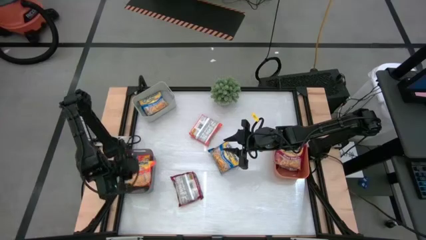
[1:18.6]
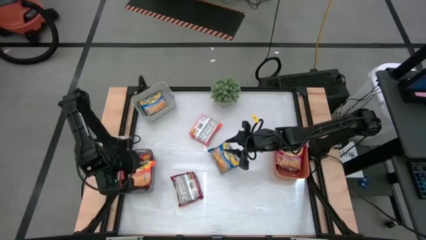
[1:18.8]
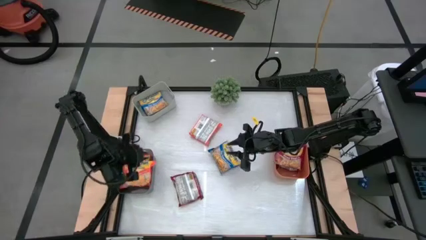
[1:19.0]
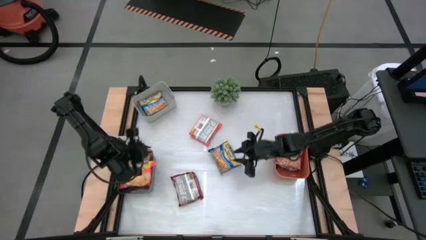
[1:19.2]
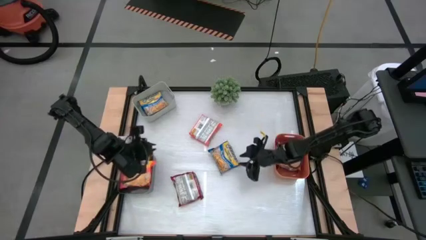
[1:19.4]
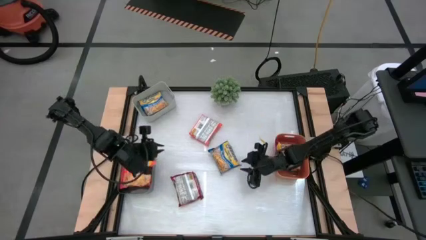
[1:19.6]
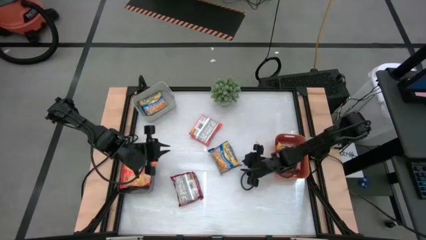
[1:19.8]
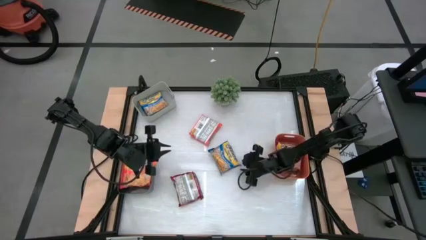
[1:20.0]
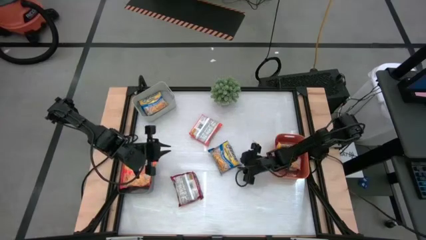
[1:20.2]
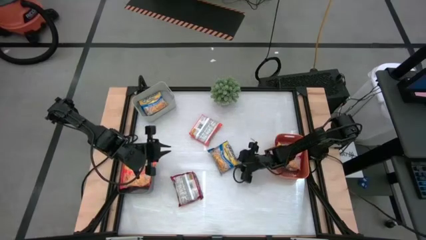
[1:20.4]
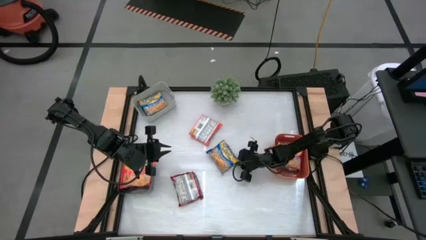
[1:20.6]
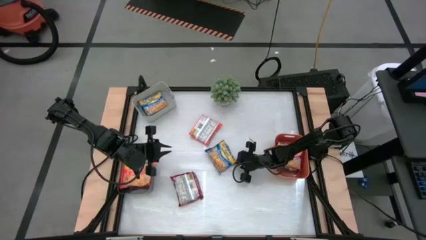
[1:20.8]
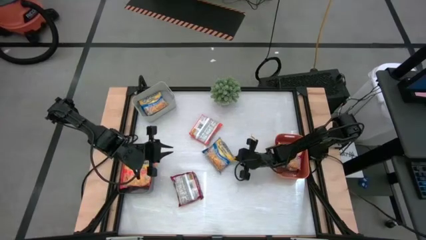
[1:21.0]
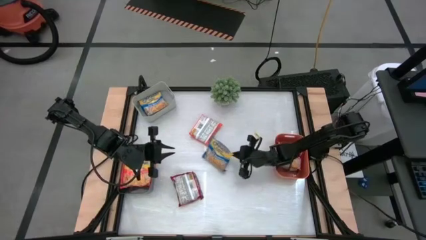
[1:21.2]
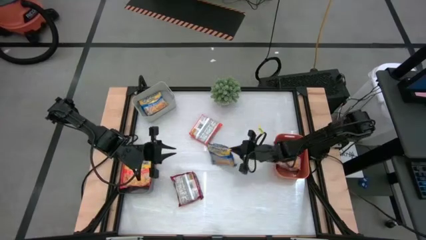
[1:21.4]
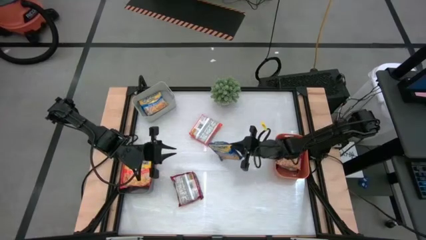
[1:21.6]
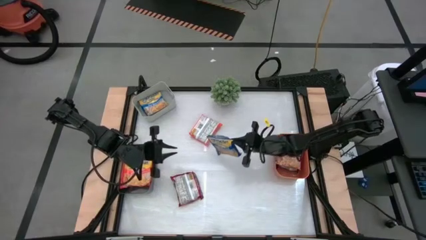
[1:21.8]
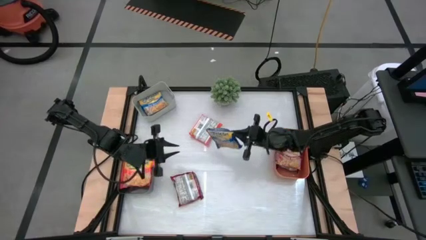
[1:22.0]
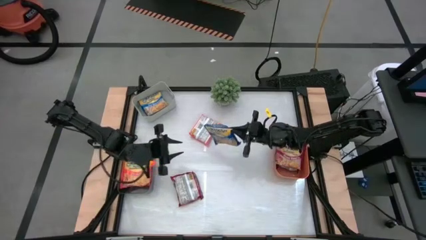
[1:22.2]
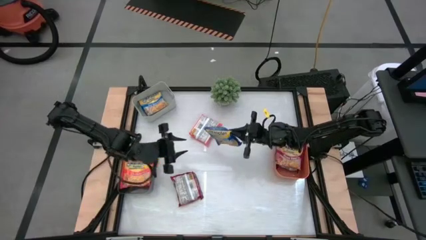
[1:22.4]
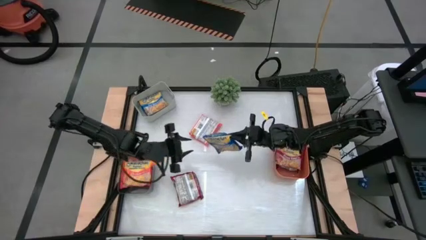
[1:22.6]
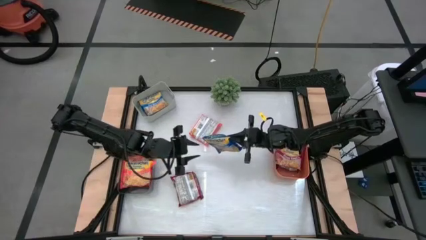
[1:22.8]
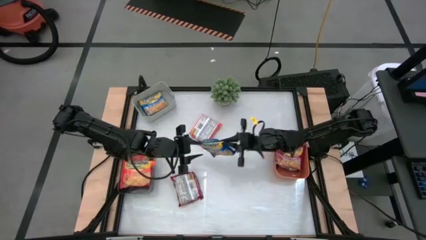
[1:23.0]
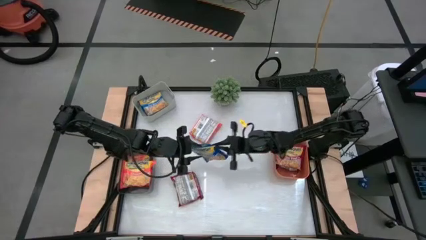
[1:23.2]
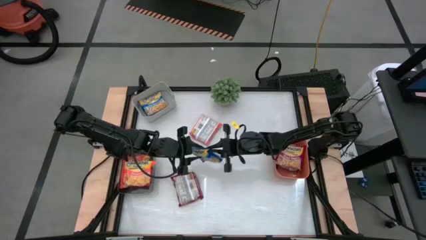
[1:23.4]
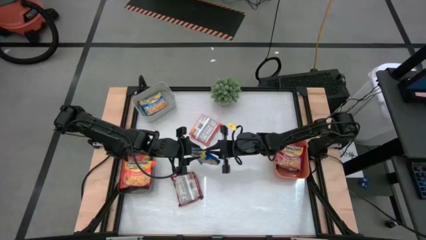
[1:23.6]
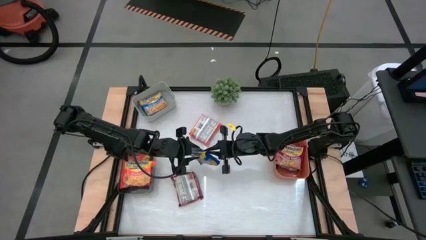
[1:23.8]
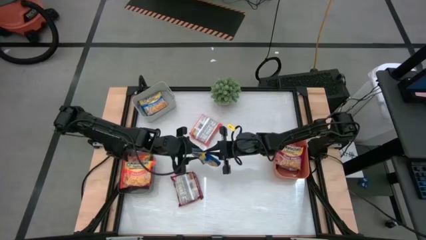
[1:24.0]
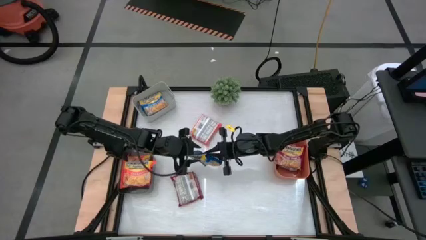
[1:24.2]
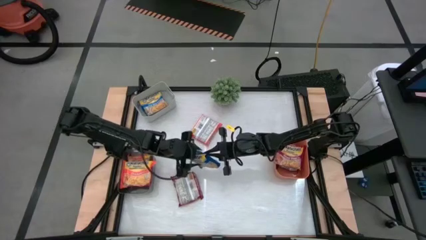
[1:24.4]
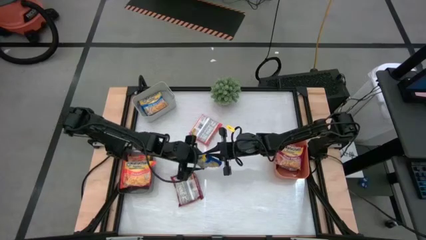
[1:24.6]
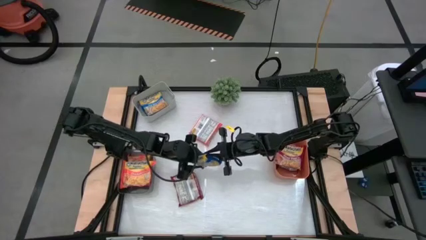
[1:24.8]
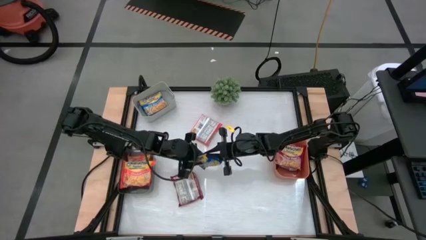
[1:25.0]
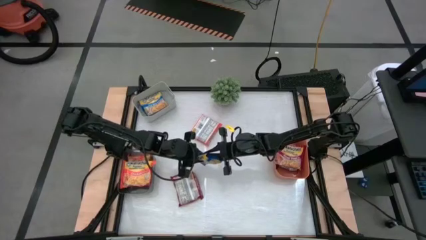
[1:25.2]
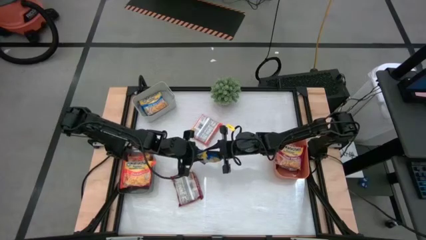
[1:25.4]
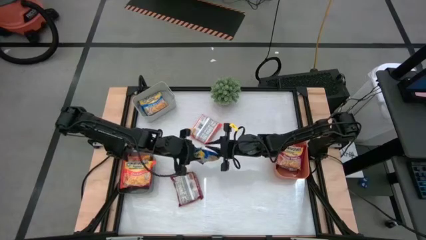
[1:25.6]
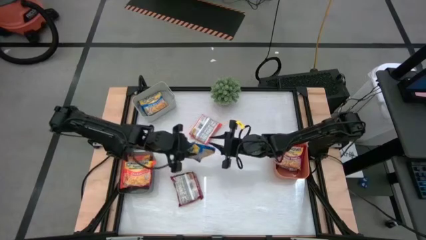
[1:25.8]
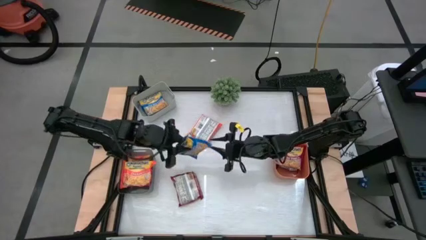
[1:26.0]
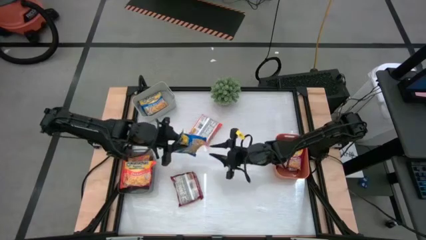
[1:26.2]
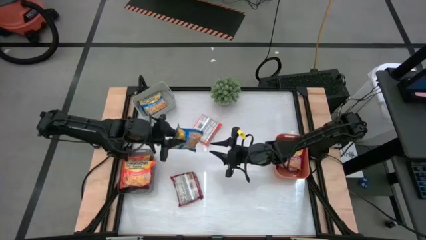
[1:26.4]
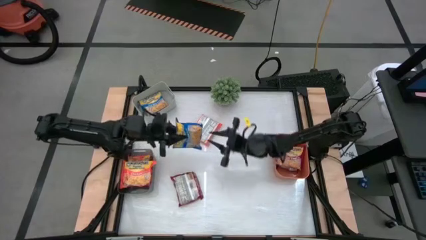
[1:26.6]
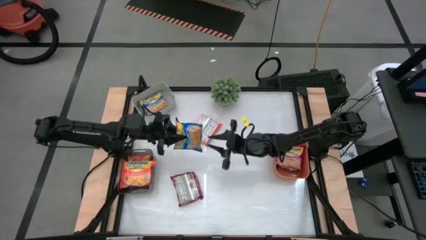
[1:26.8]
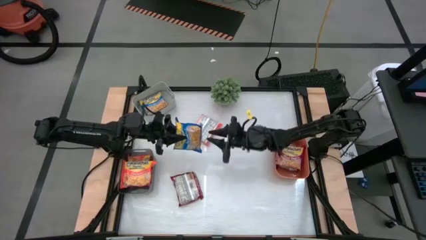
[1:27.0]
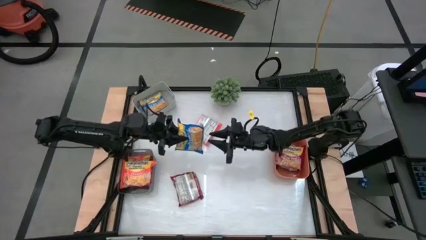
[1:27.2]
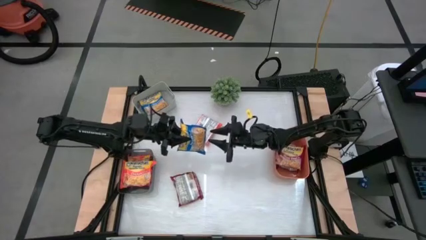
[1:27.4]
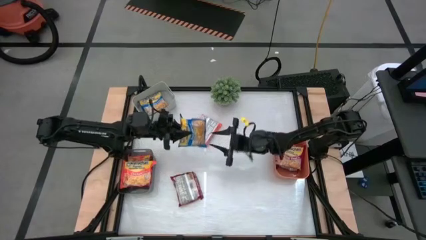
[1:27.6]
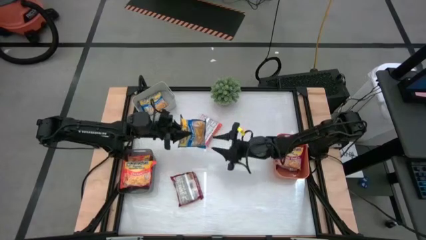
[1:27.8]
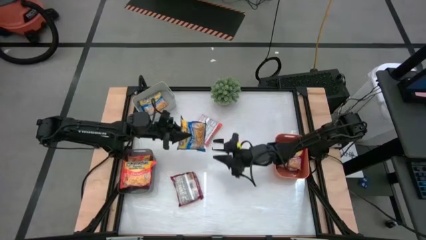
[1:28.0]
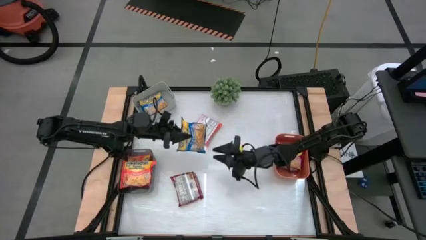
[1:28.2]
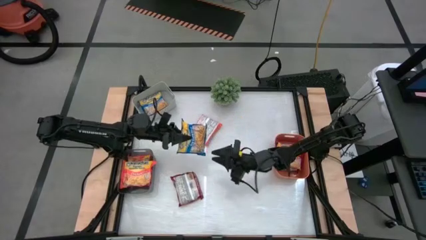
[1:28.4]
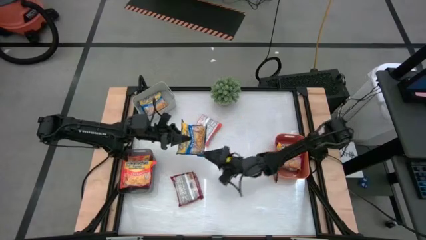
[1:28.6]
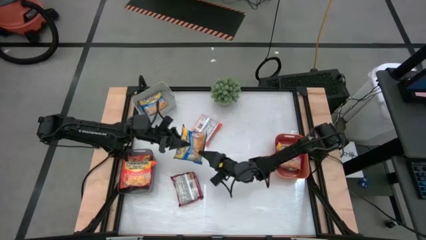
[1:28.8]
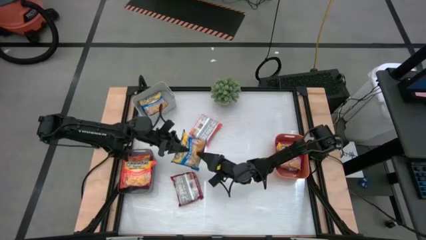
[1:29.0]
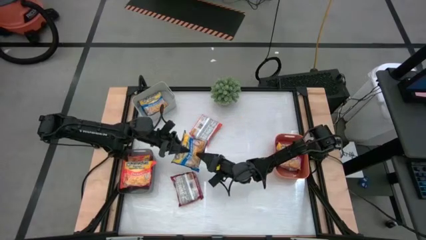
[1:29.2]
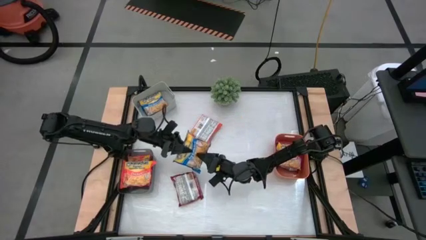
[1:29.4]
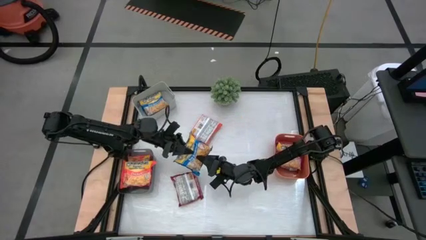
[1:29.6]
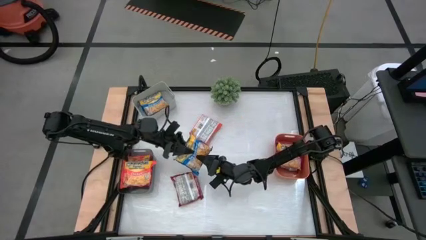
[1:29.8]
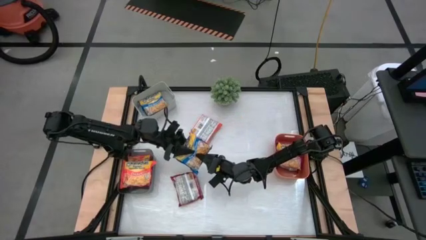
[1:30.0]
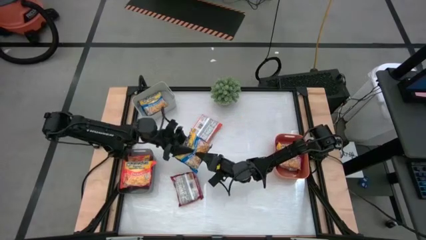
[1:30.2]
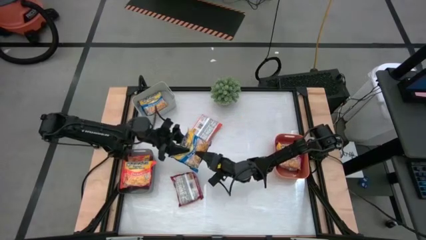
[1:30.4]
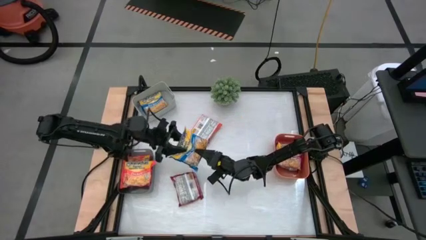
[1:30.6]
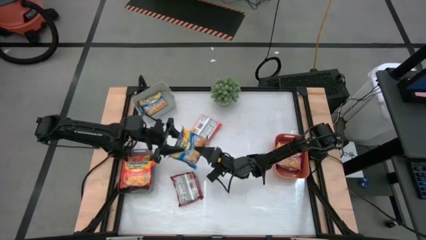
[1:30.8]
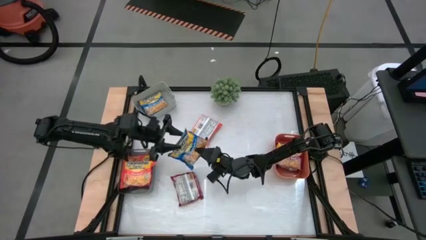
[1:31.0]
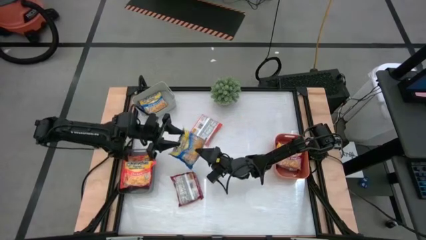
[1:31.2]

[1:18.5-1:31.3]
Task: Sort Maruchan noodles
Put the blue bag into the white bin
